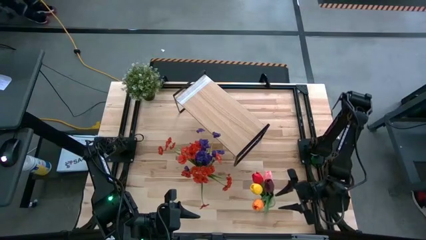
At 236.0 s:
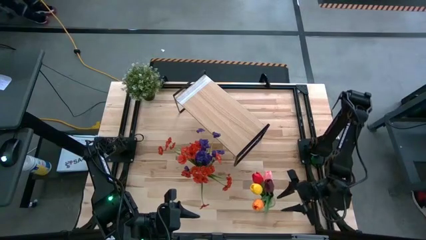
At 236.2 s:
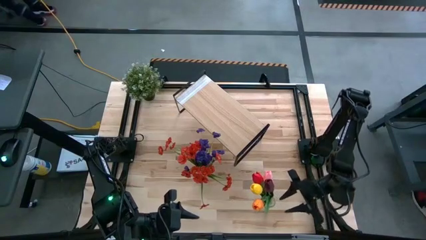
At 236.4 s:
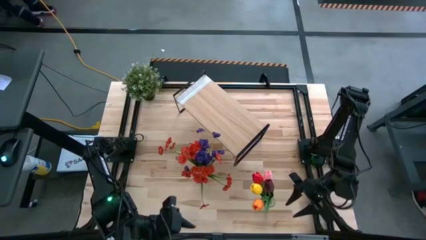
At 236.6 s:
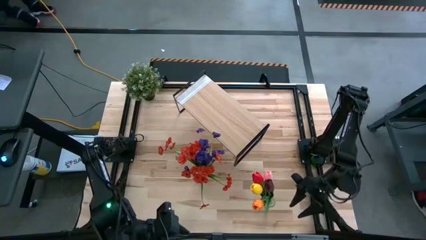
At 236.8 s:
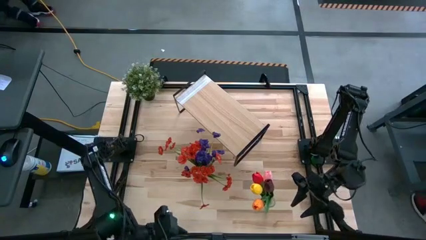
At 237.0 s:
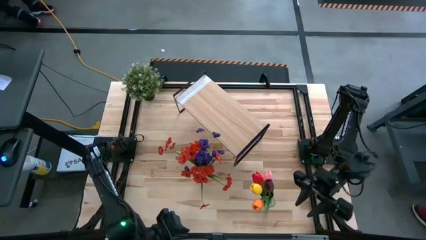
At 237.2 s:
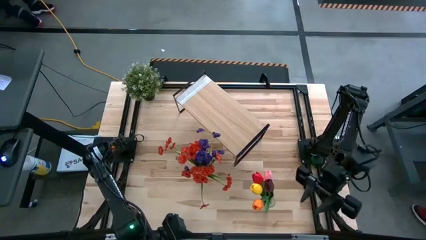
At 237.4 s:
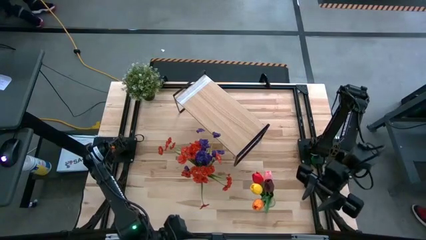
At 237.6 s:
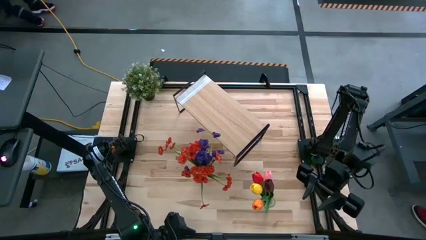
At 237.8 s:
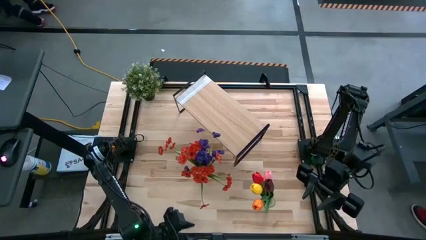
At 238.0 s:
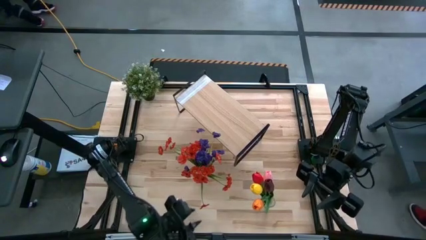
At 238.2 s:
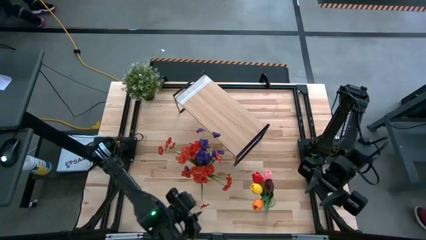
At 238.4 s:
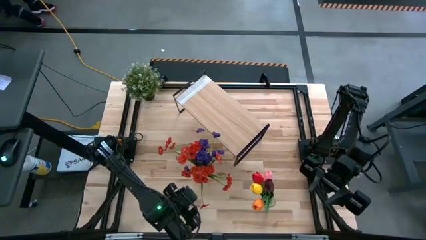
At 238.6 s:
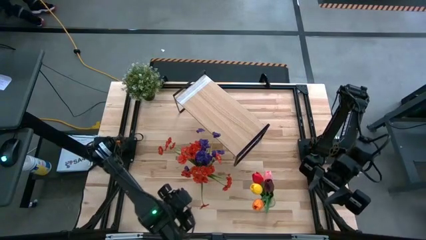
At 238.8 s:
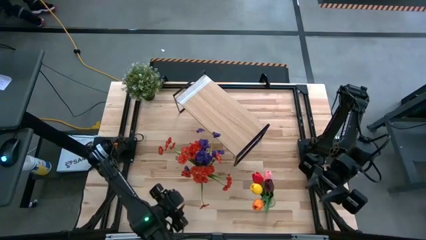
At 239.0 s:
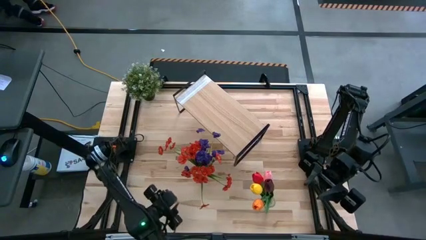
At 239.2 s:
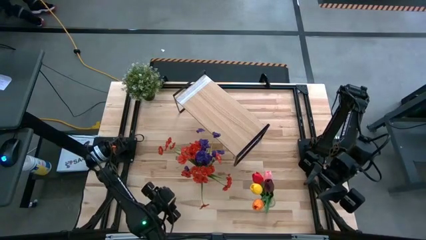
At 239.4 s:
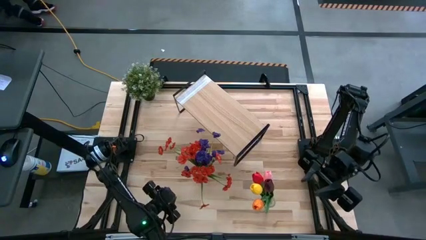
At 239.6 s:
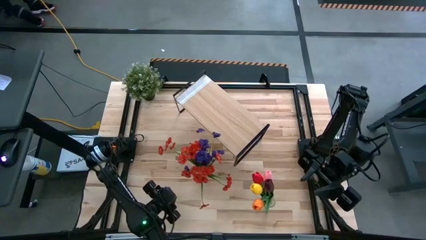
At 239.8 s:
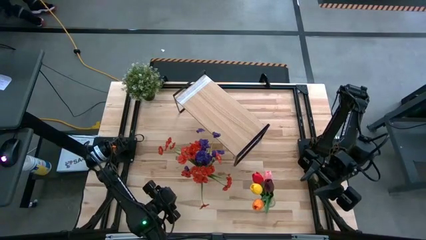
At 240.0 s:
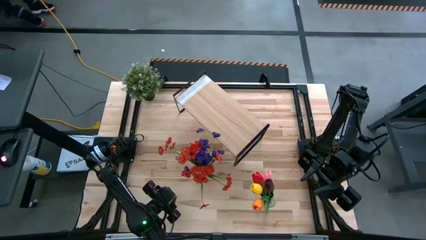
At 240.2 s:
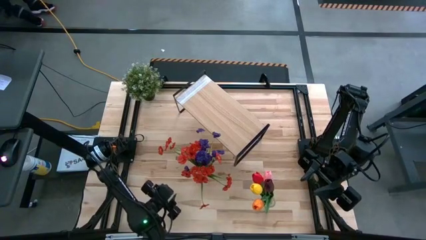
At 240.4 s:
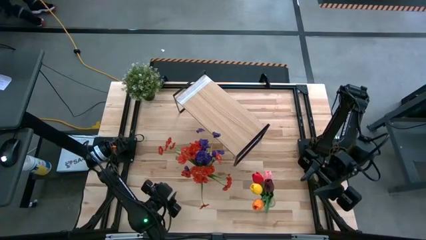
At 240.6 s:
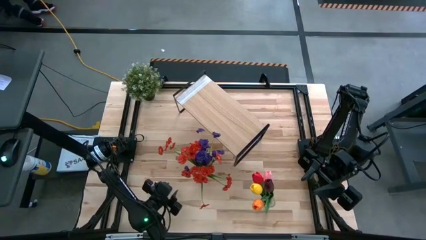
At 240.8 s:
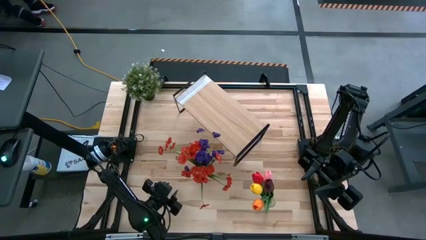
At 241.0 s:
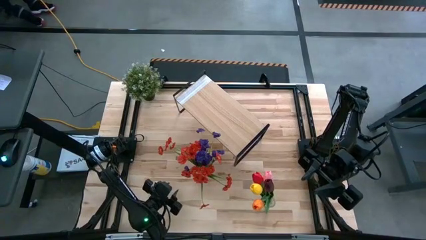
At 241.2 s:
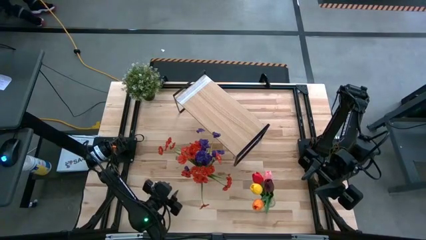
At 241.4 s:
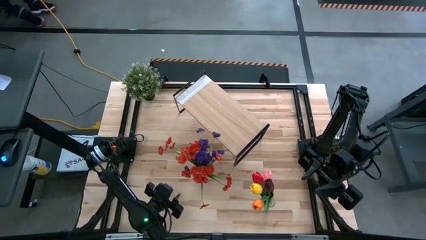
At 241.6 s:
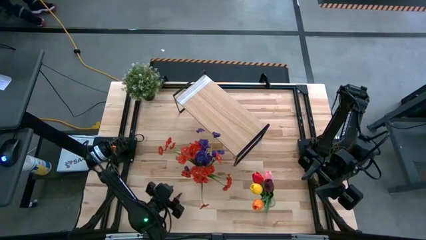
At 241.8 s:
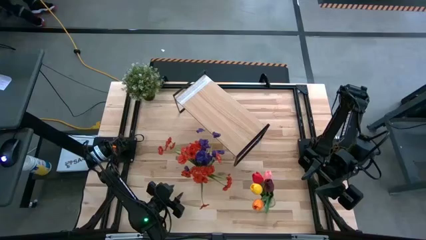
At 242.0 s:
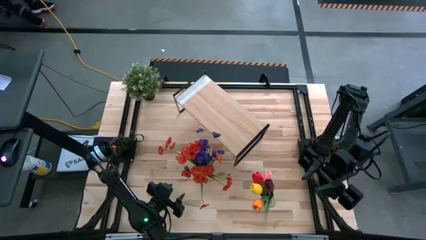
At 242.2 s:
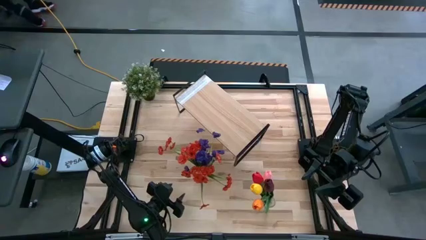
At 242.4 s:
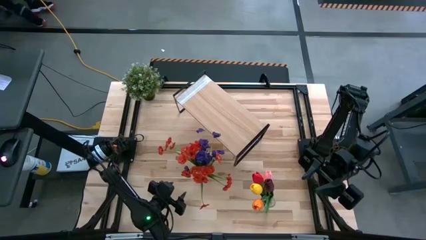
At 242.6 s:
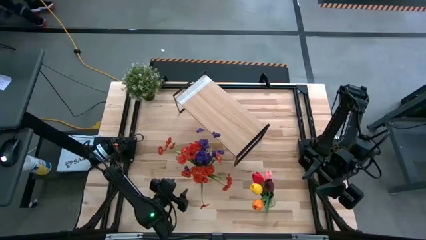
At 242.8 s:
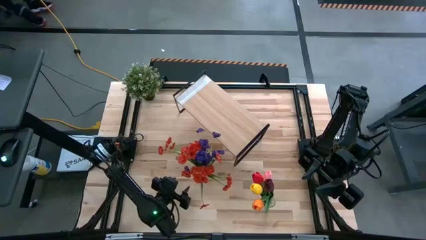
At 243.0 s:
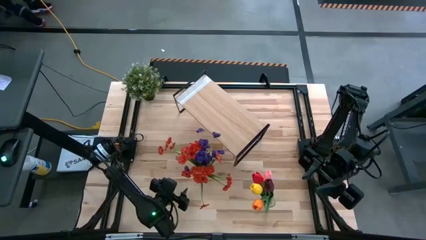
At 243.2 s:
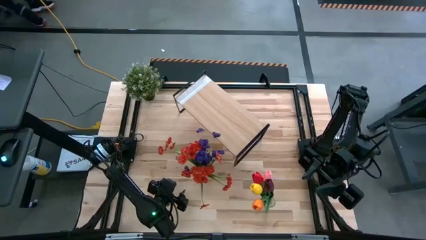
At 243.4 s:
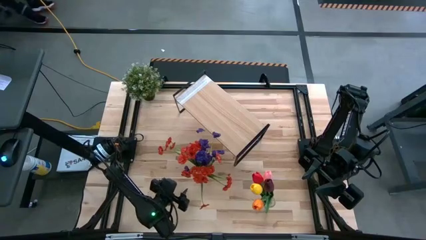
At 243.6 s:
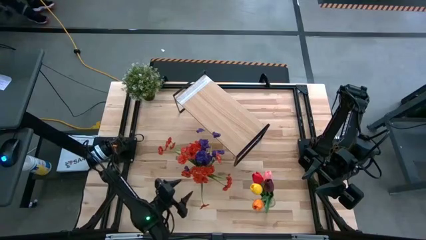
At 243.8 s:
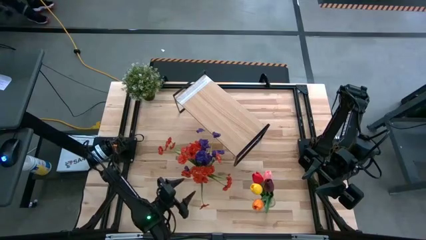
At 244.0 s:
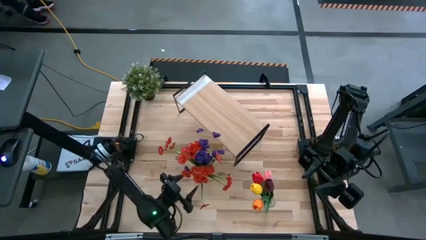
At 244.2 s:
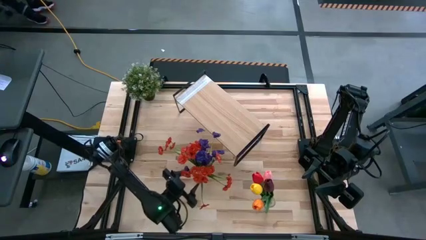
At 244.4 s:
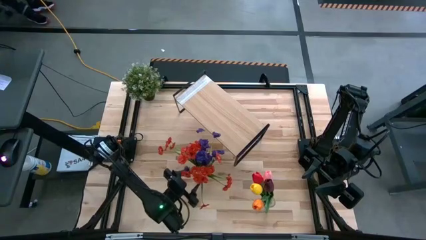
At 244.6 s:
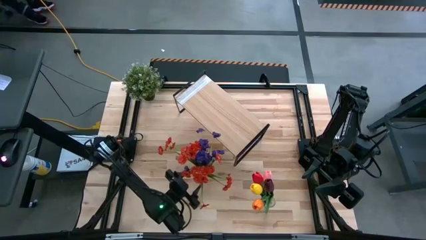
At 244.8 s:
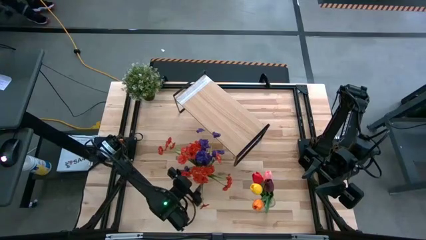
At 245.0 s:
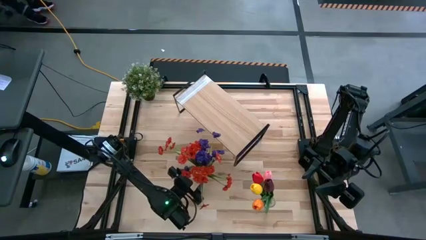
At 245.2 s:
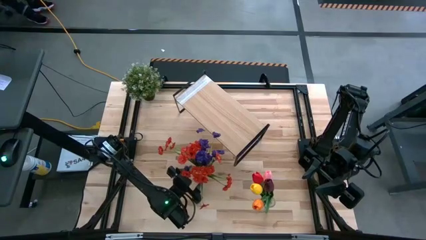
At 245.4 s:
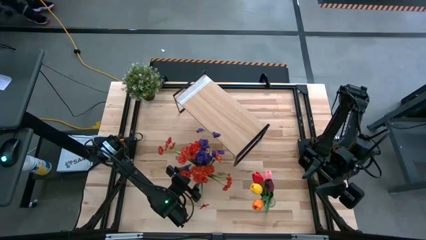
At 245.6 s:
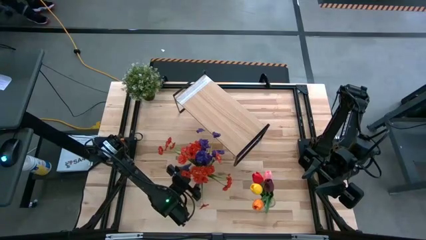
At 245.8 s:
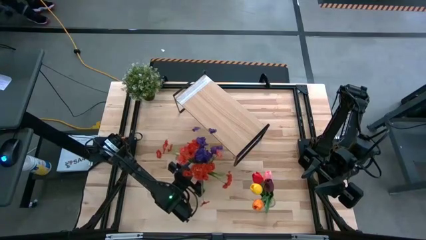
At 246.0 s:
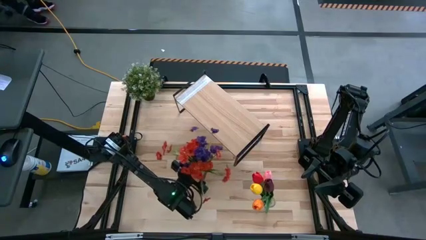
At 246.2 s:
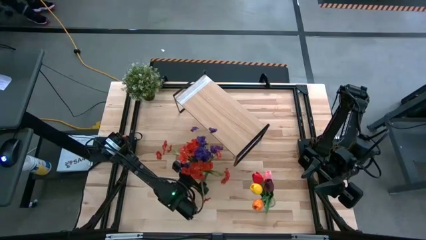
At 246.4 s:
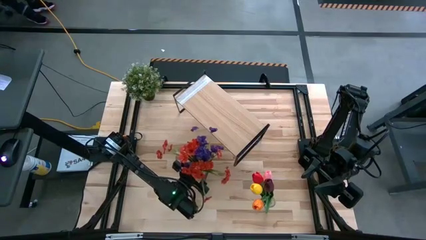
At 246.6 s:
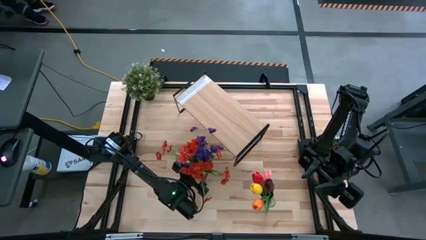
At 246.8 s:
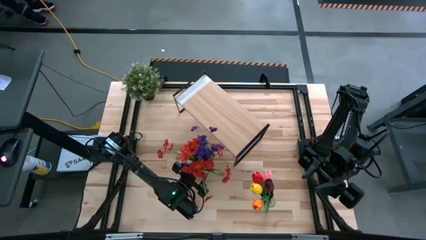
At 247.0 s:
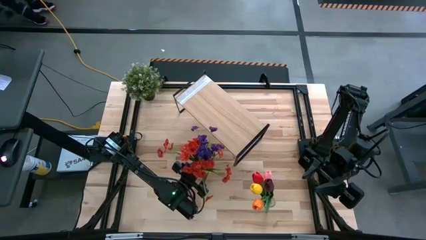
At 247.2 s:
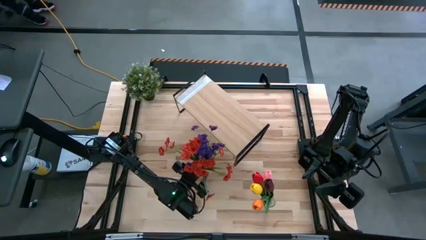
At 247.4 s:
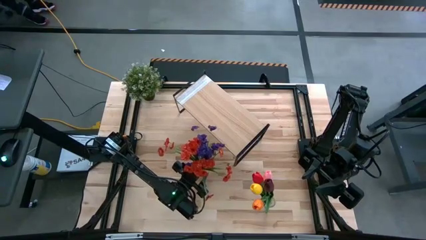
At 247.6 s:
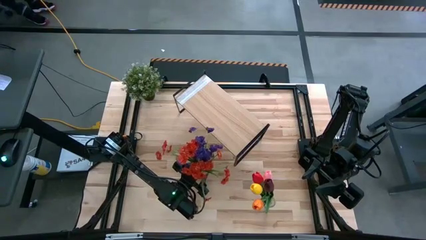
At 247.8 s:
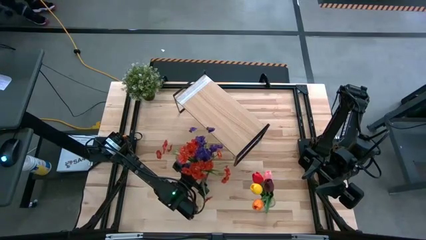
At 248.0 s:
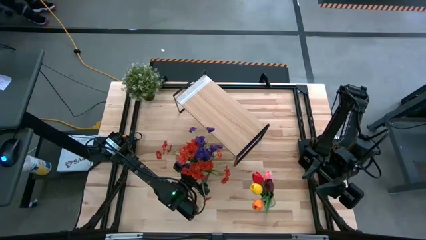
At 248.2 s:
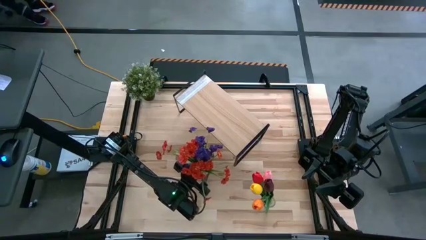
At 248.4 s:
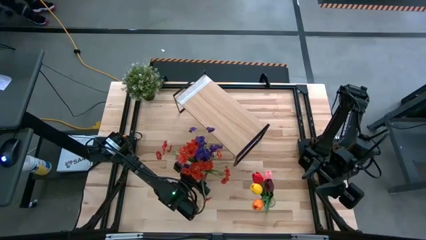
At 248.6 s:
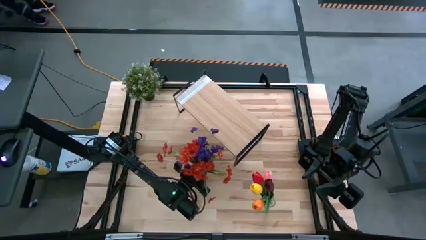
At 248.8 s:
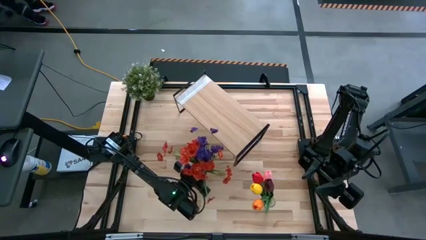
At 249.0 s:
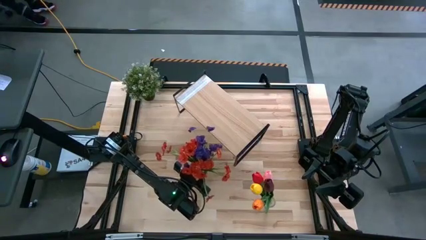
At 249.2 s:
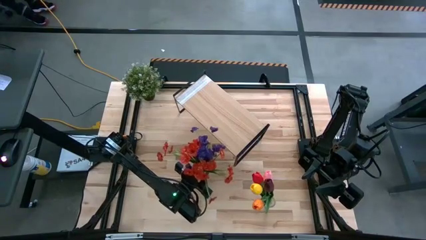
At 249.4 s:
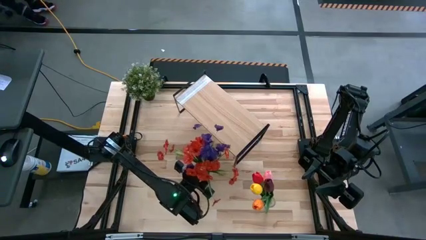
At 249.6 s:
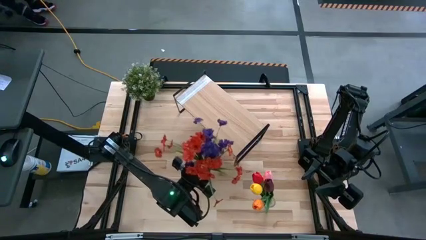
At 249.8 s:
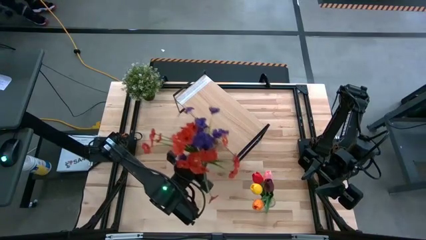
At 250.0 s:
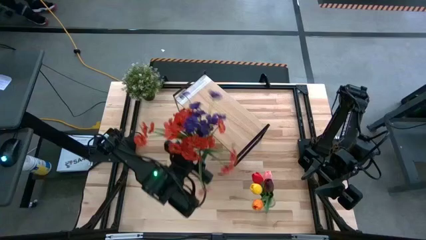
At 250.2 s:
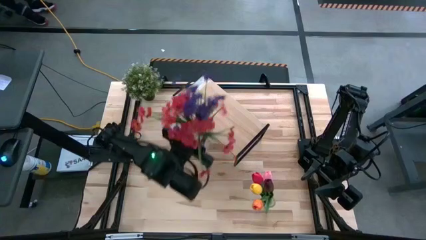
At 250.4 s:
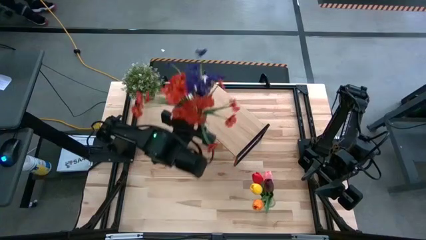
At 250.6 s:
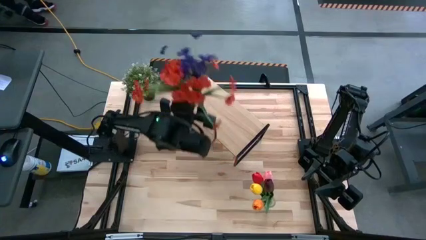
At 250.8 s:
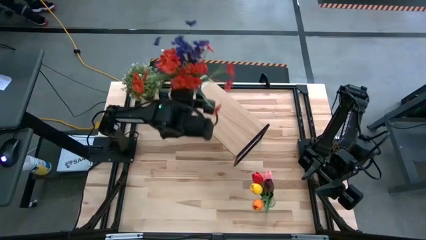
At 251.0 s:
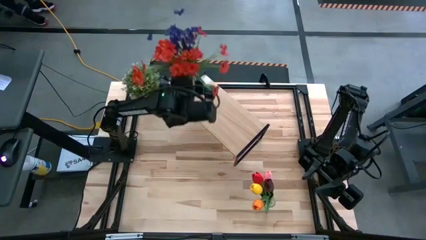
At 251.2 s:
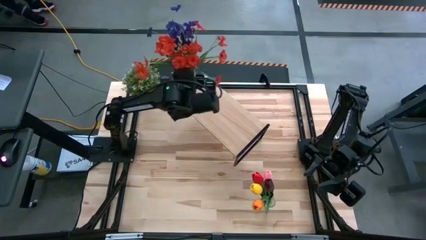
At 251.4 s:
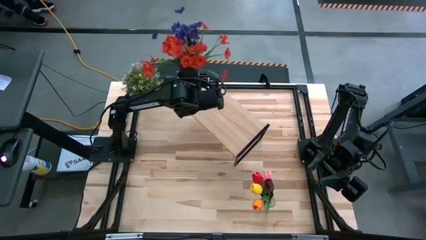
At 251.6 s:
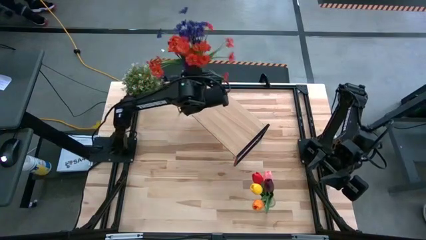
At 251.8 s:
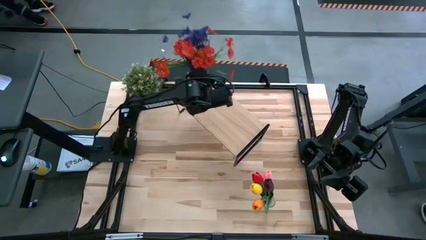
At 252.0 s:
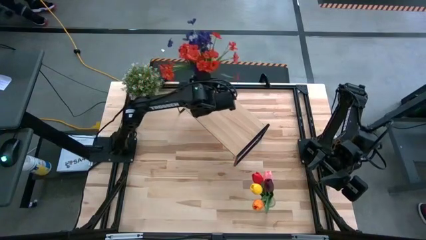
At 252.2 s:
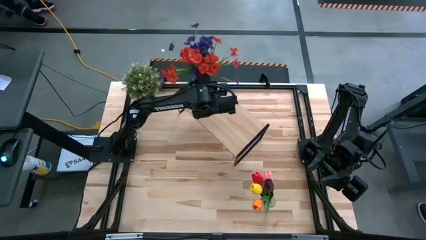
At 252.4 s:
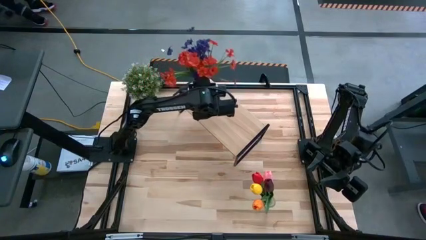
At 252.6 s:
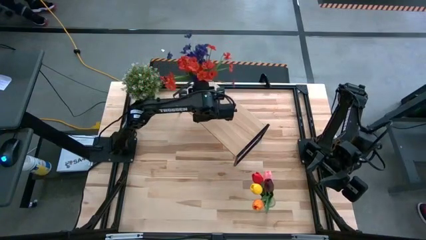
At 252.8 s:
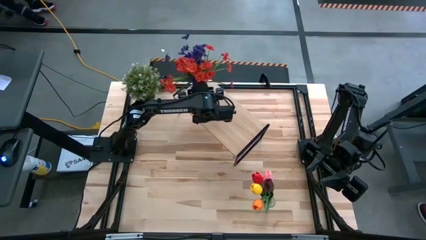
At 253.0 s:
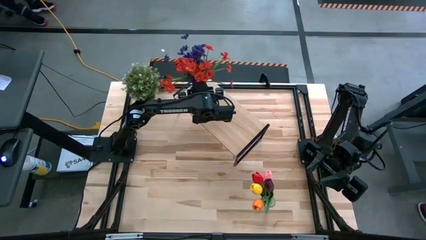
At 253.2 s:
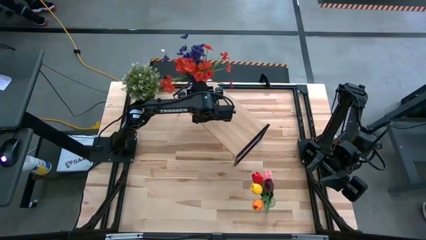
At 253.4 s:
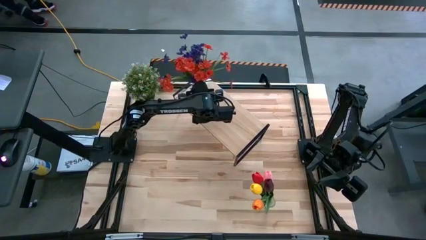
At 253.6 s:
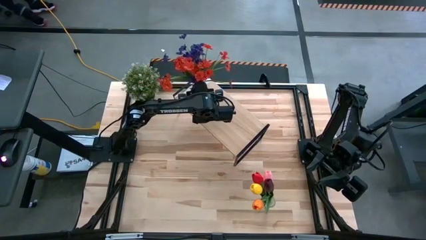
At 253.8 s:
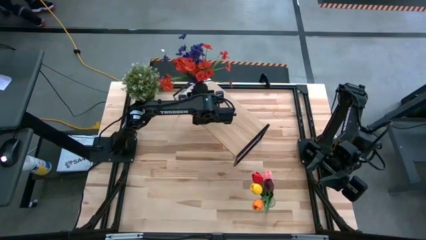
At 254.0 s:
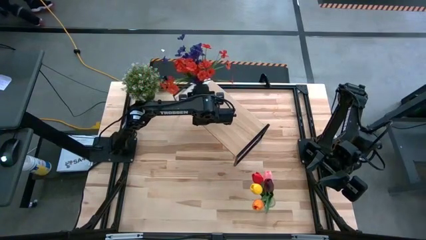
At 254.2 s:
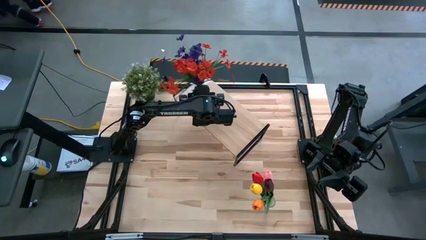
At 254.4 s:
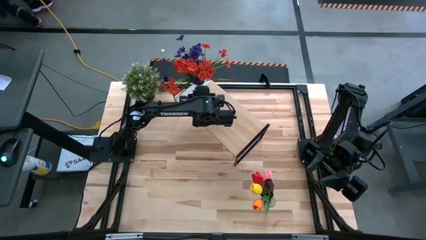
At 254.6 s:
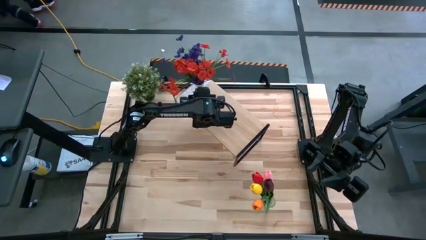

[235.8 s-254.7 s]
Task: Pick and place flowers into a vace then onto a shelf
Put the left transparent vase on the shelf
